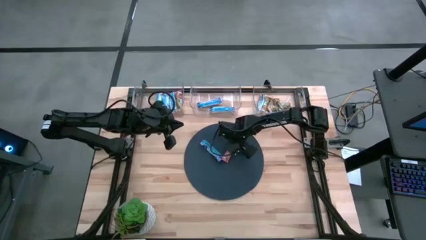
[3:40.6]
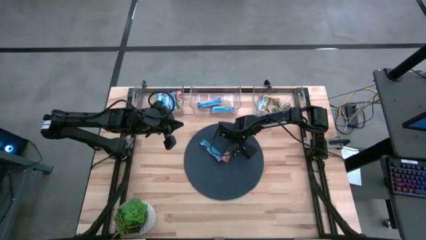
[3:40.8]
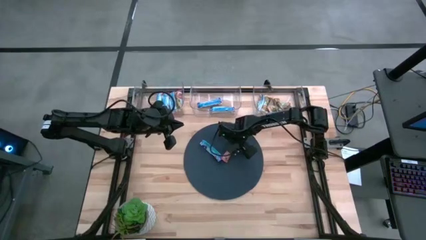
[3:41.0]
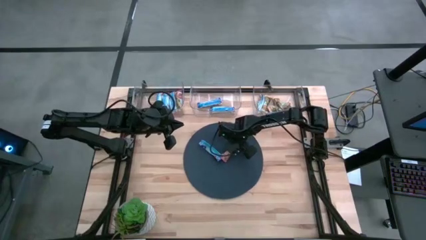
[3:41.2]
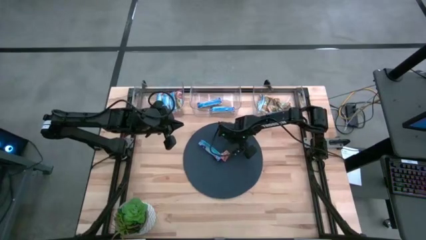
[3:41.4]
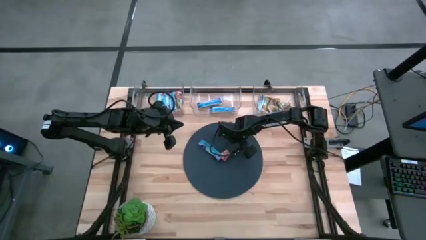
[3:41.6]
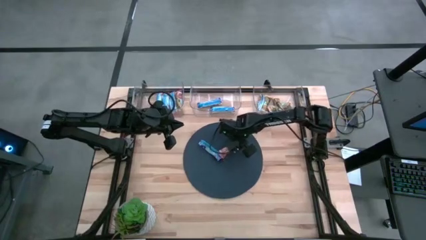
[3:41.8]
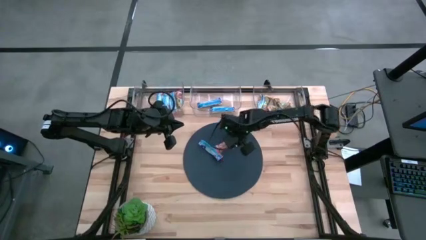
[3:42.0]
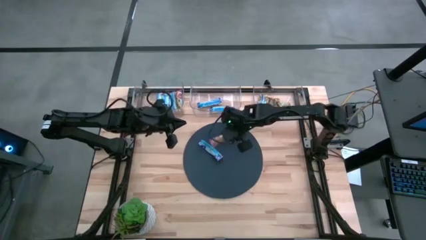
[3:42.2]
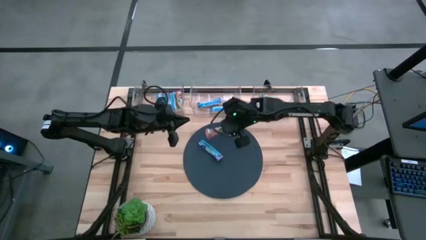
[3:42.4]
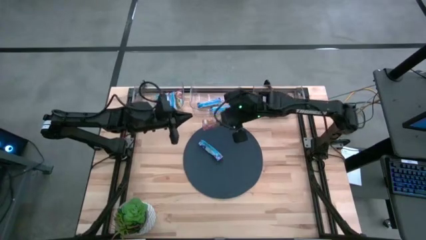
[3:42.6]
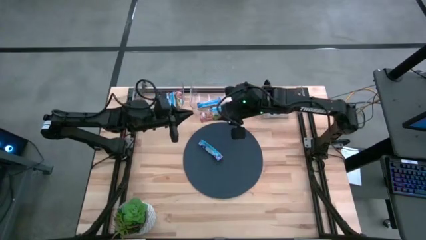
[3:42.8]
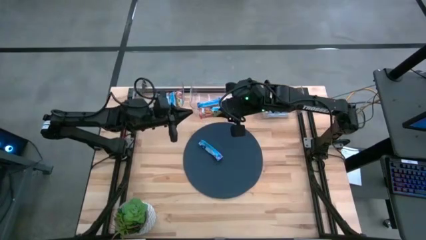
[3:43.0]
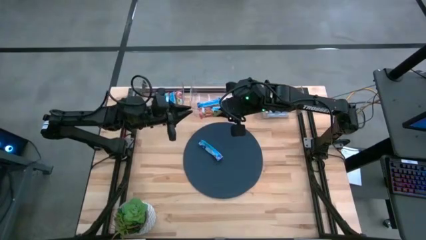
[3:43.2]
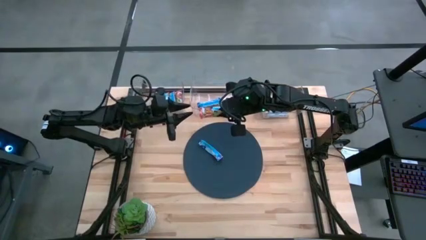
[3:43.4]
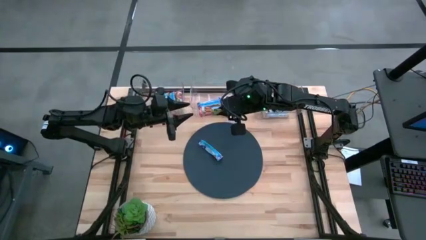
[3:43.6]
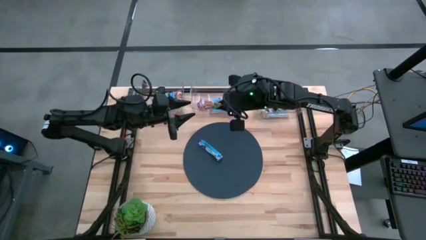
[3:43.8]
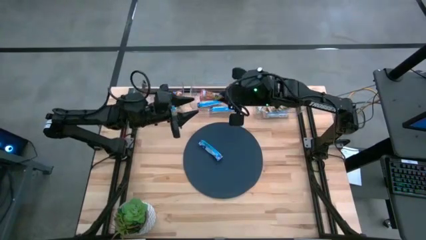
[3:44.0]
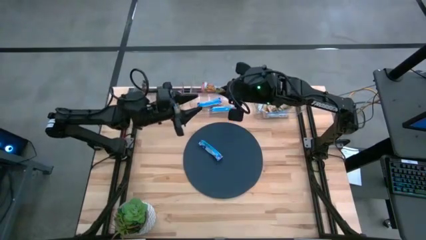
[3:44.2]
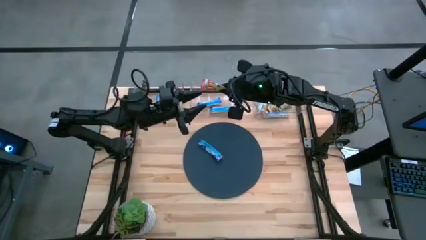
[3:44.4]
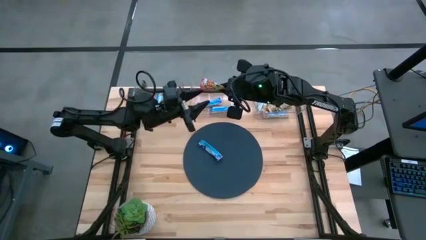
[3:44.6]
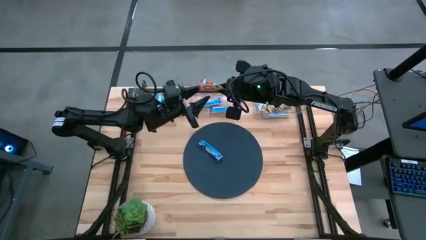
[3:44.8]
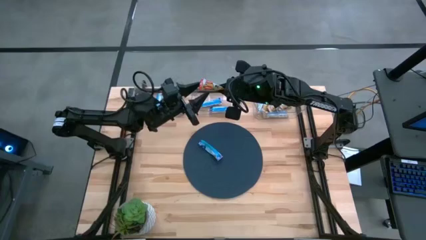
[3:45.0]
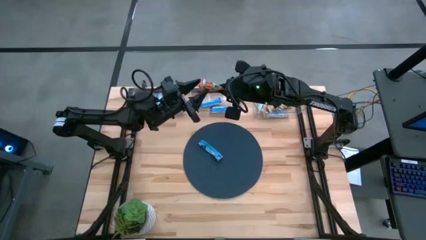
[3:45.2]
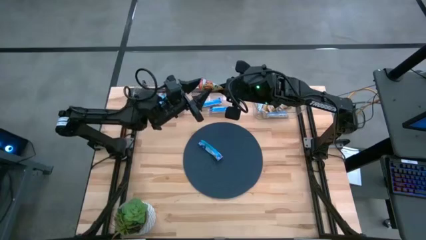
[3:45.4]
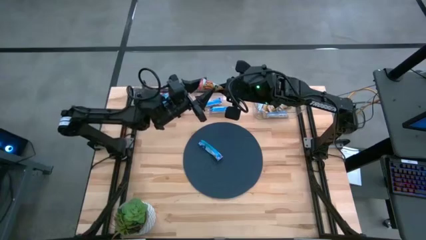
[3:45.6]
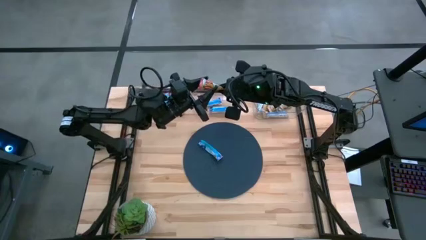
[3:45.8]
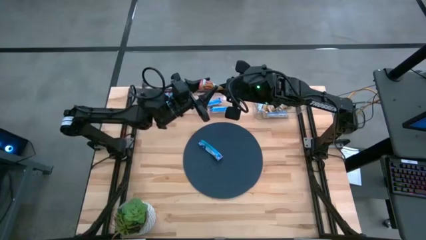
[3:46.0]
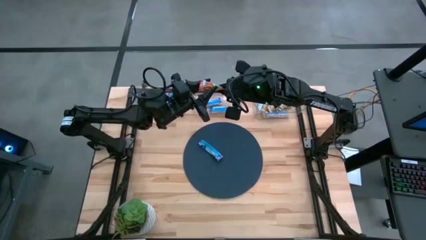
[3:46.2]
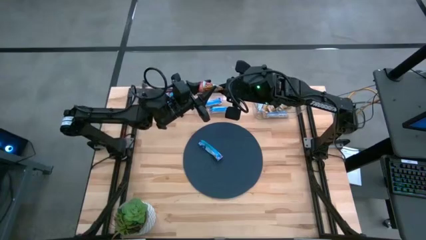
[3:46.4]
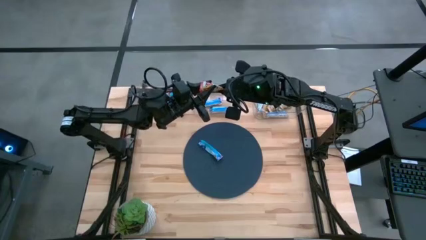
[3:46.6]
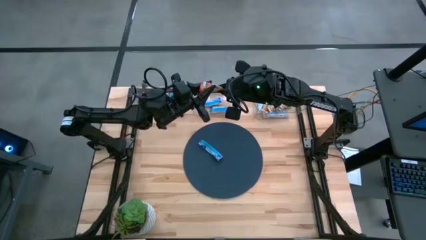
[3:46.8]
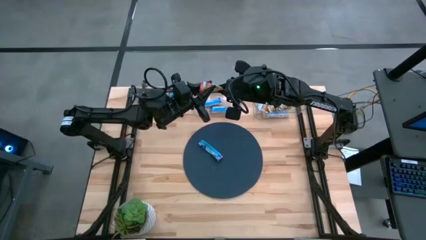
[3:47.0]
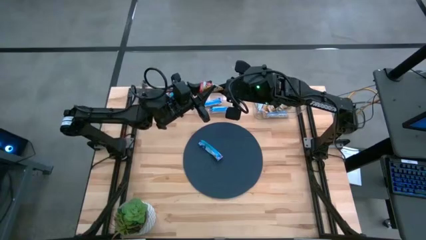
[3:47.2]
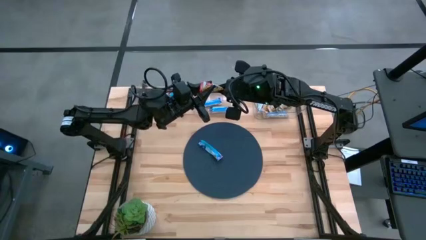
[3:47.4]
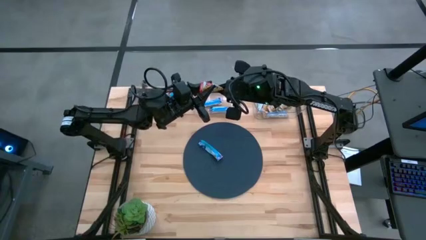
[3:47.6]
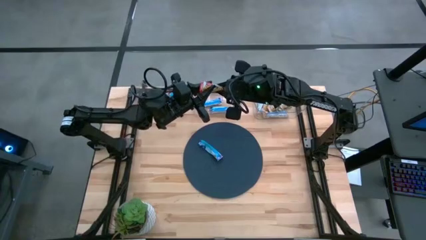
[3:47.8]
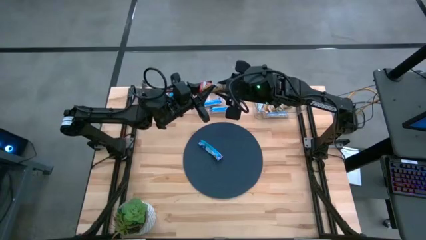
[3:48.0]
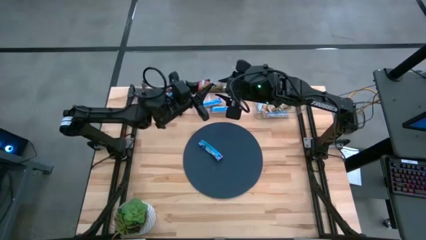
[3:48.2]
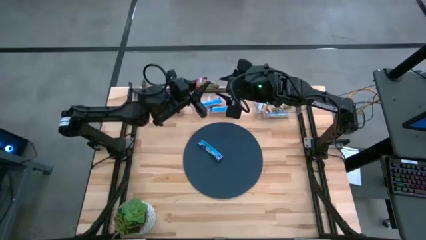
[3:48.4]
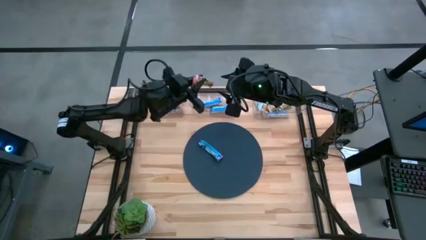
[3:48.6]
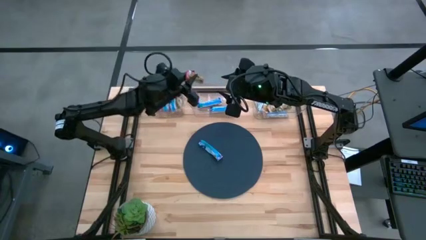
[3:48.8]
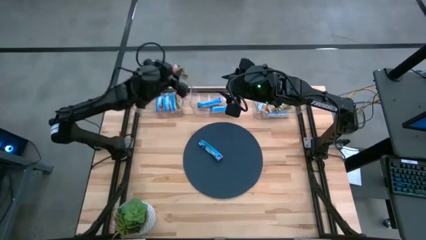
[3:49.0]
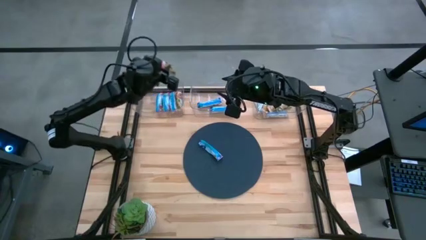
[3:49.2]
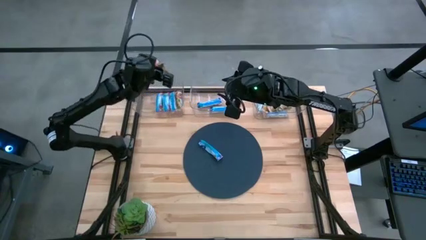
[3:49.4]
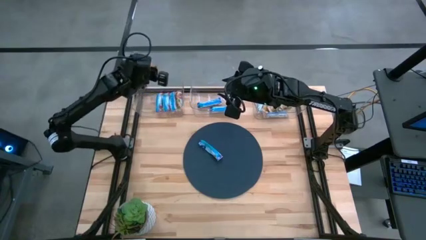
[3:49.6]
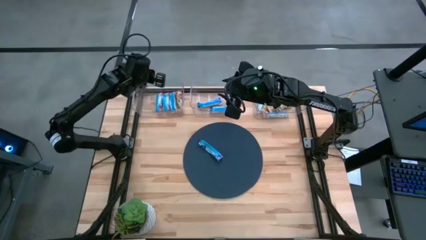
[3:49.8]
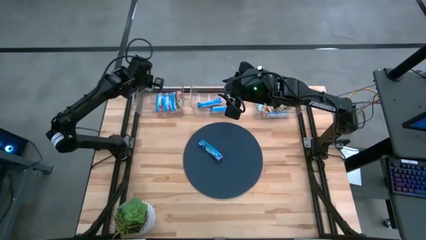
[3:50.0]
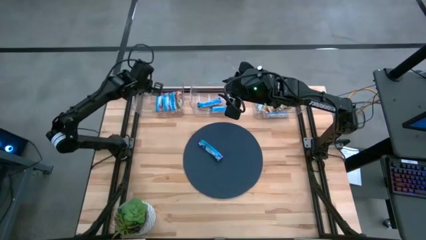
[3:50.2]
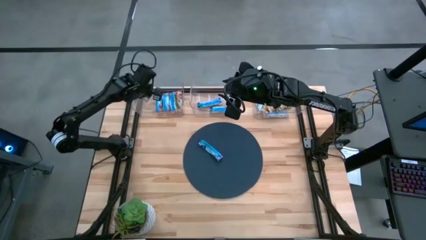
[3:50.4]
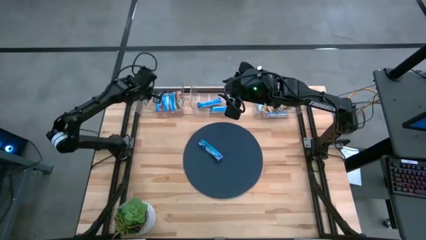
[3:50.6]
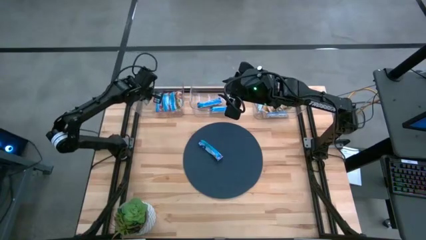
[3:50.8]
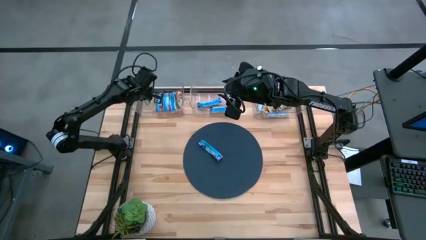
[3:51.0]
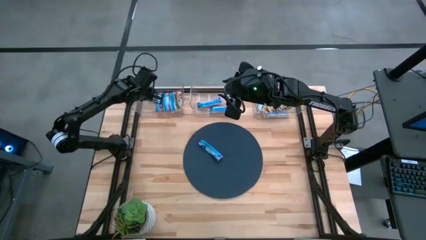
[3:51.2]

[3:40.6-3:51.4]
Task: Pick and place Granola Bars by type
Put the red granola bar into the left transparent bin

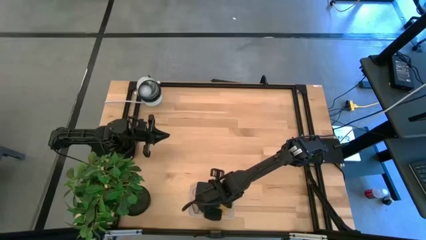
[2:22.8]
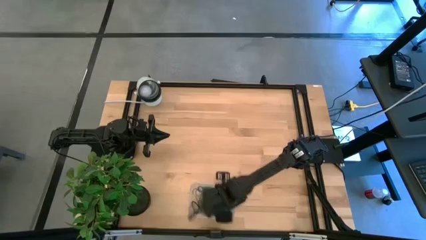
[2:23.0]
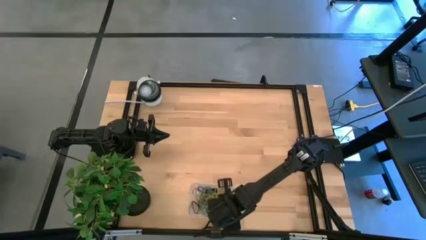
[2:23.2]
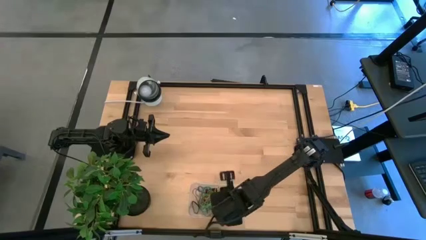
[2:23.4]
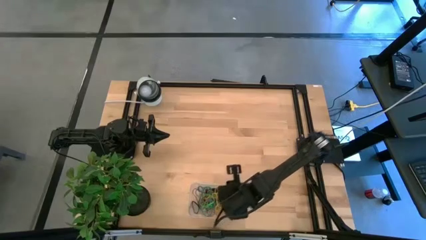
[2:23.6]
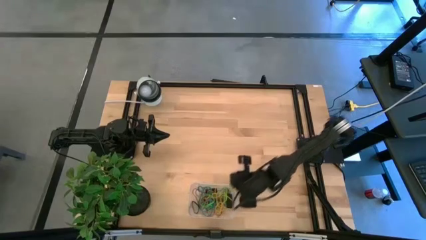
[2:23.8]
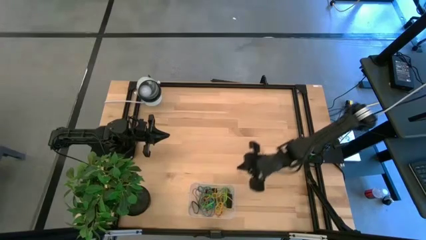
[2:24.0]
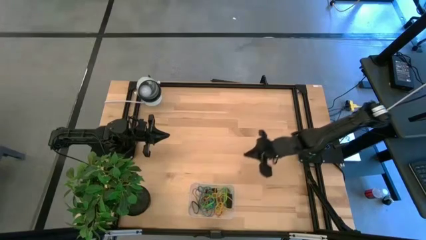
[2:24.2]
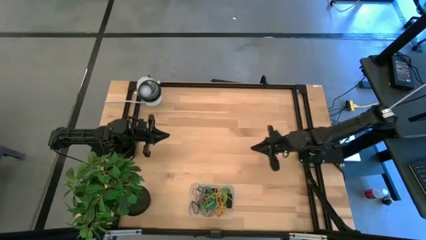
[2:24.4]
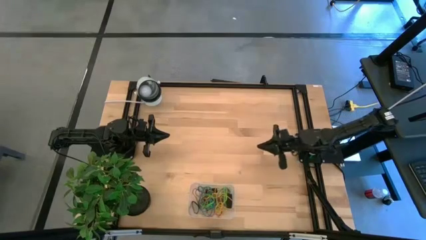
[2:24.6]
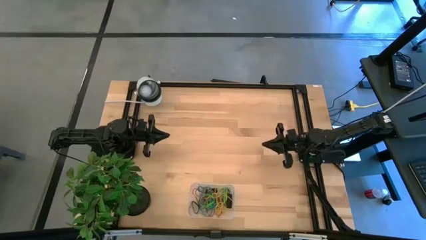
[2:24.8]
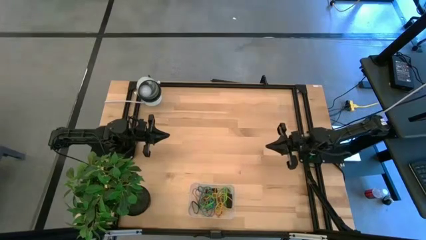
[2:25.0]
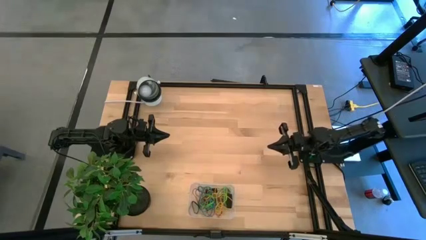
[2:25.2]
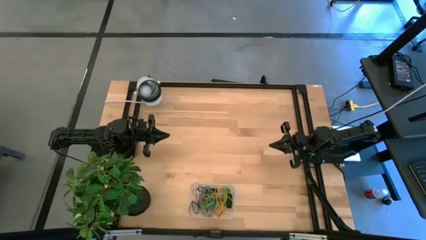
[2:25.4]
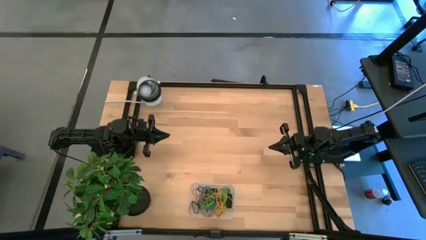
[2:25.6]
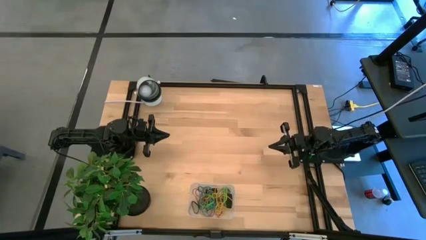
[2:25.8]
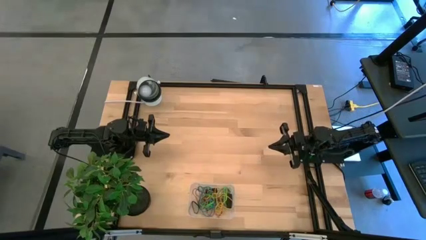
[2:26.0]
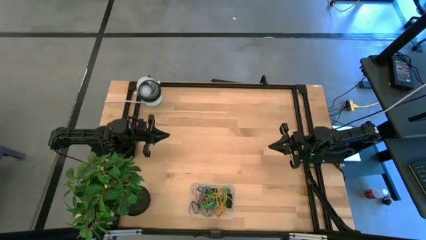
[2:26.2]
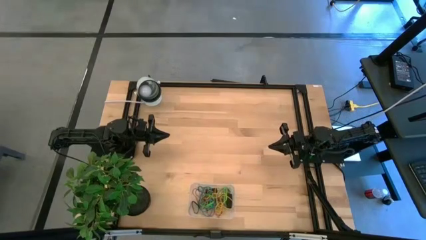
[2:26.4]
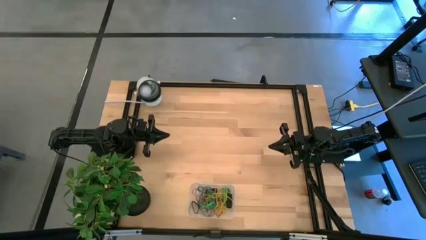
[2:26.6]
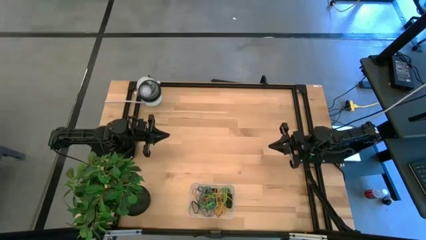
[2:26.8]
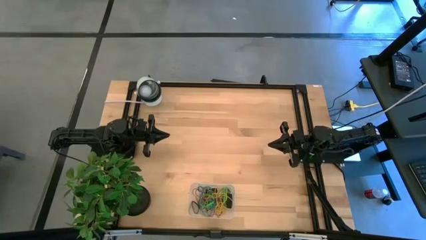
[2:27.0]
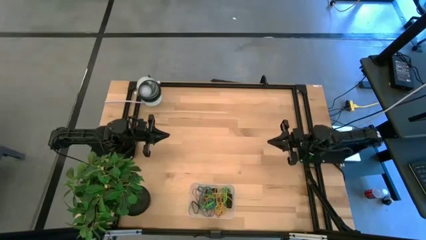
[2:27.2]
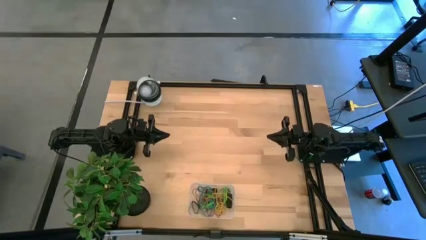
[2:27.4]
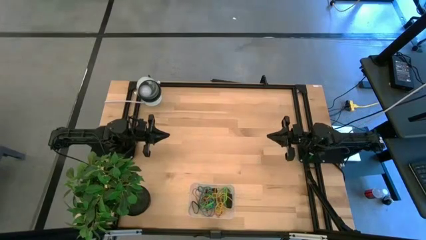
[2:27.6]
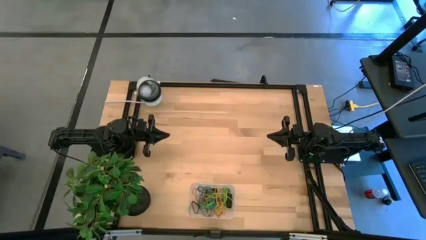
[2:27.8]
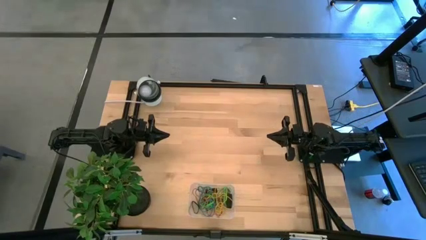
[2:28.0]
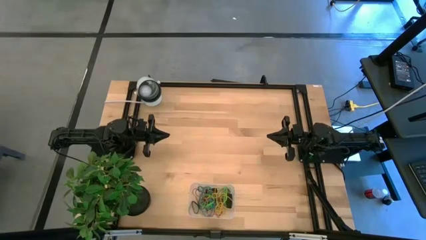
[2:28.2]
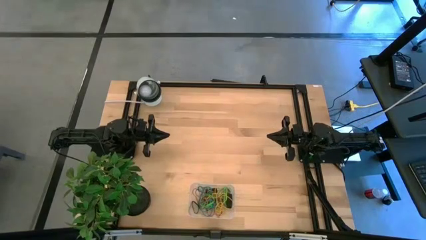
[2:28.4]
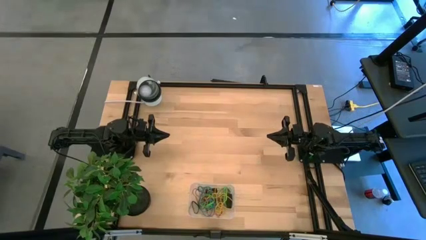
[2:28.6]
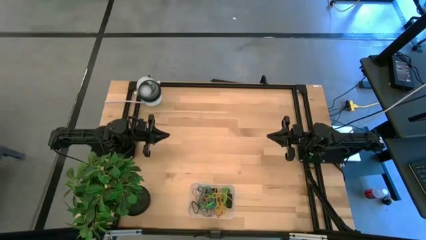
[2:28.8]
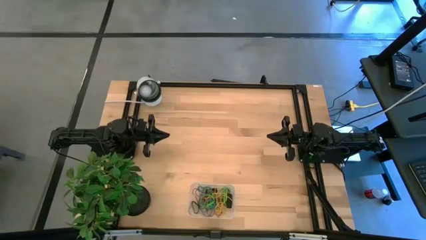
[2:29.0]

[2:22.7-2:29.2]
Task: Pick and place rubber bands into bin
Return to Home Position
